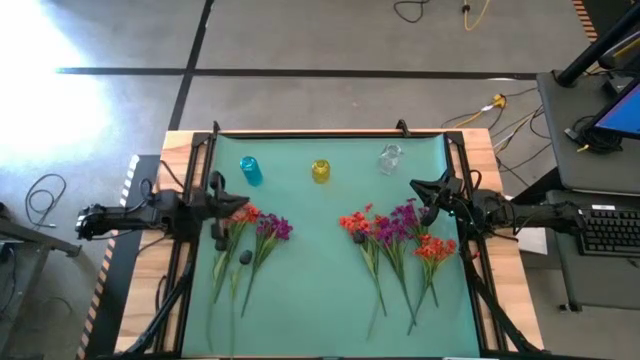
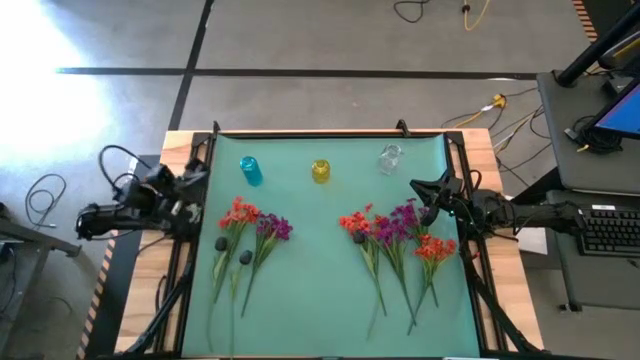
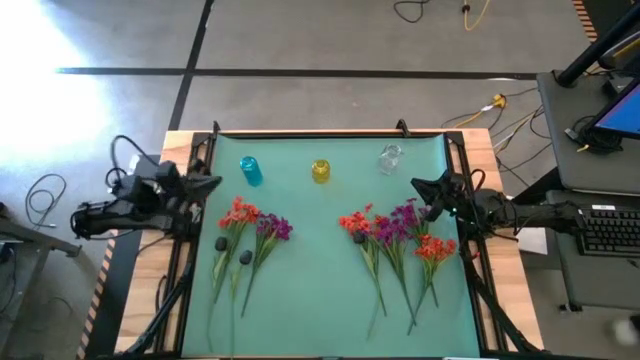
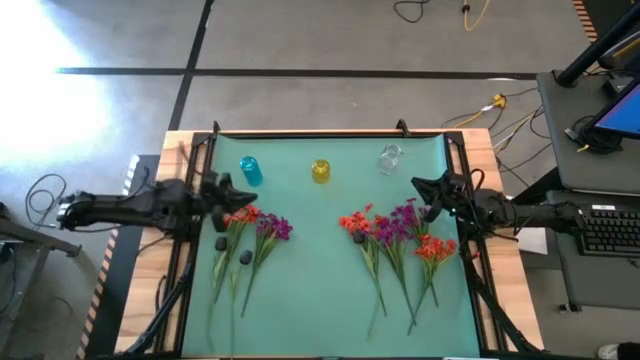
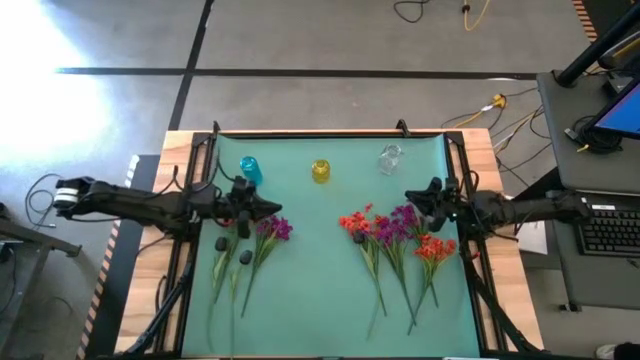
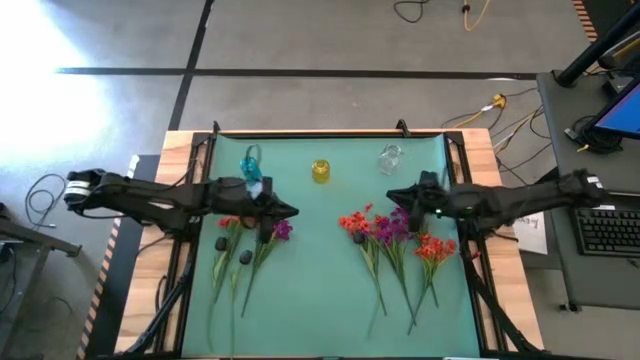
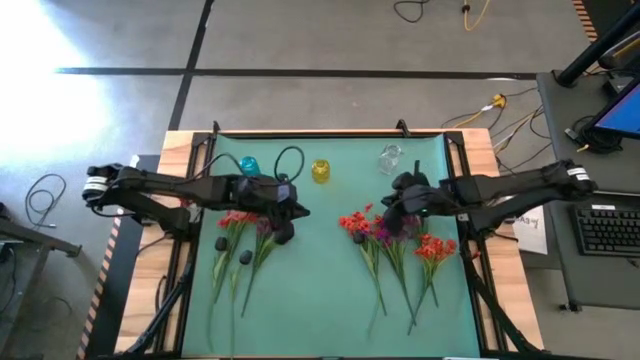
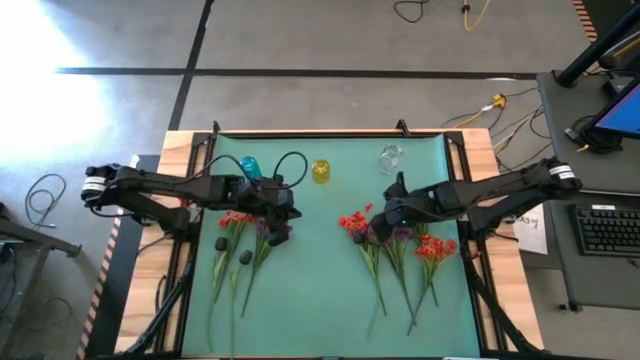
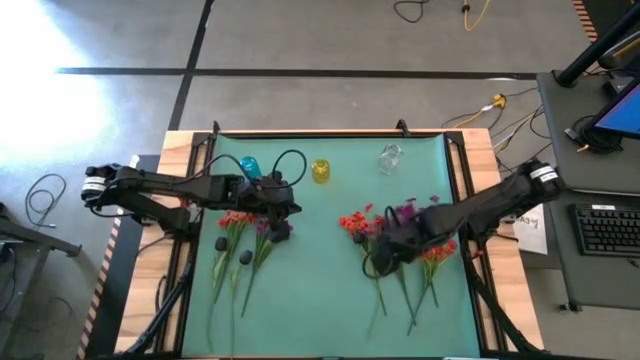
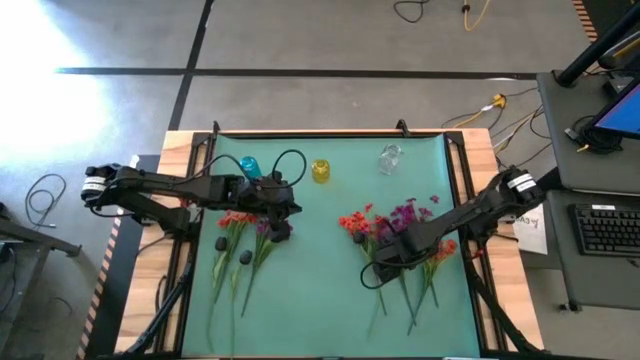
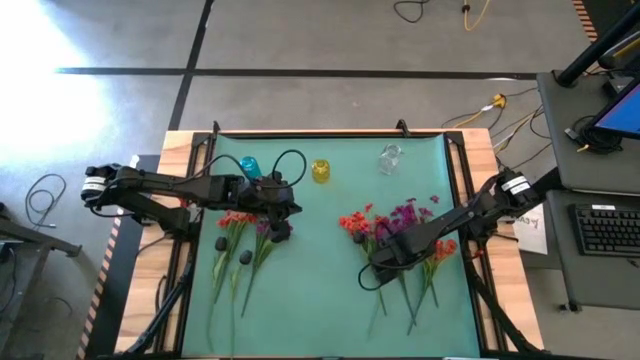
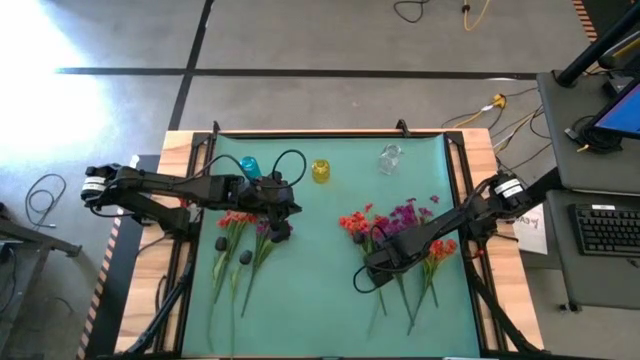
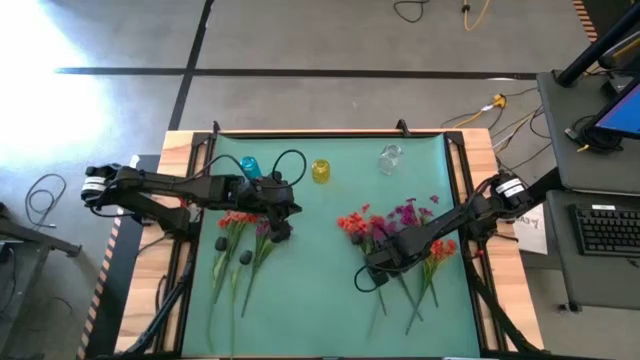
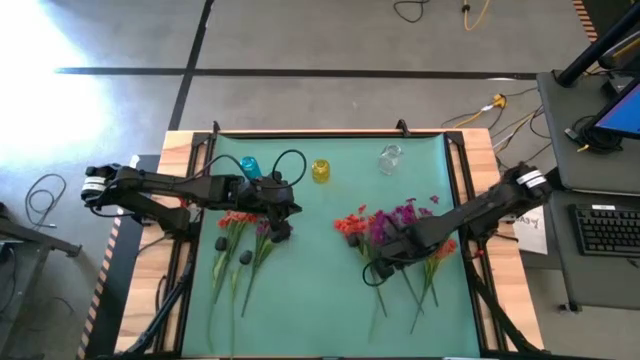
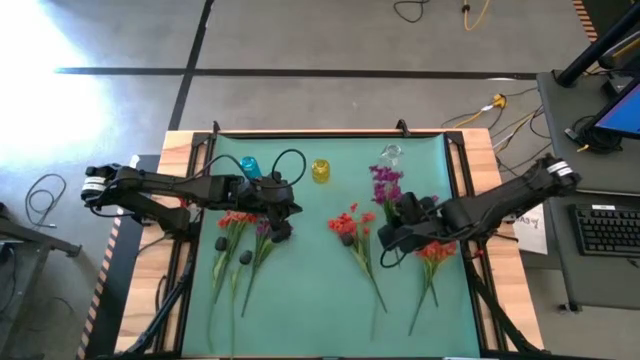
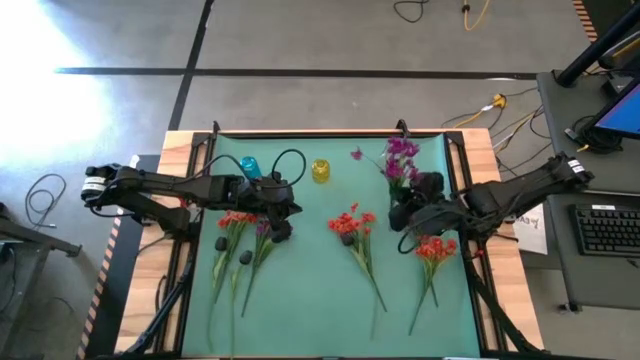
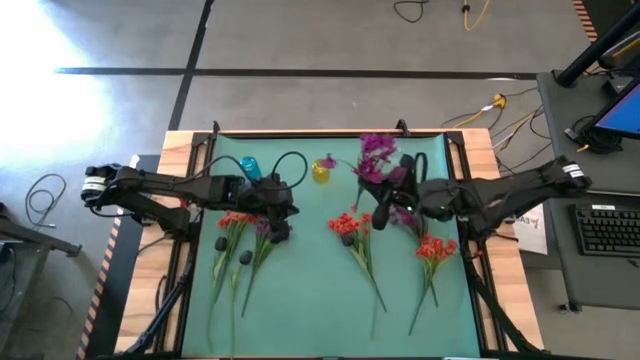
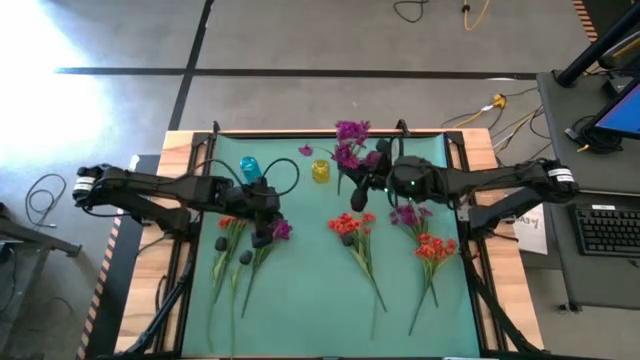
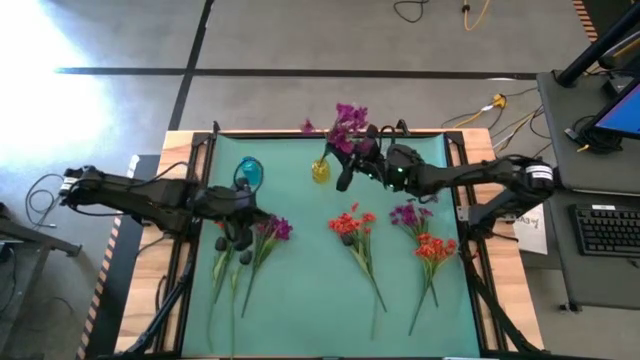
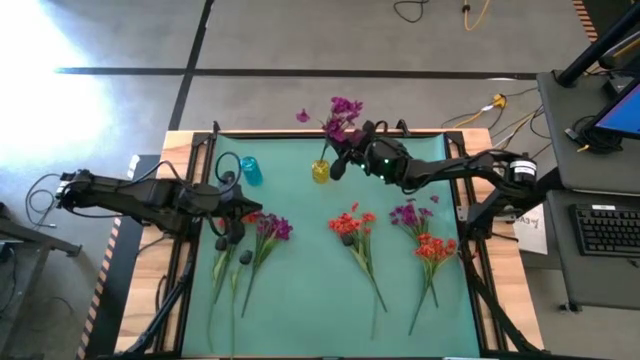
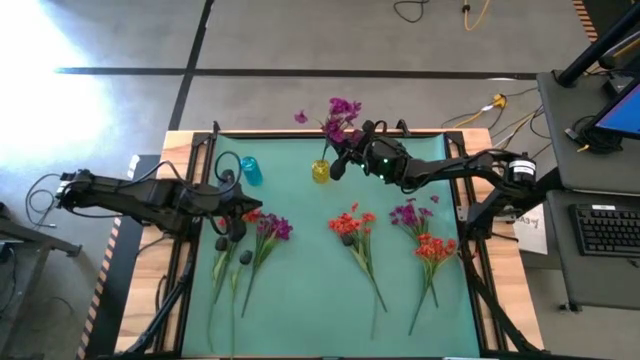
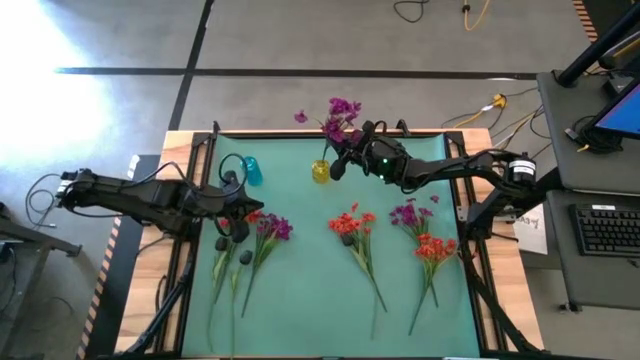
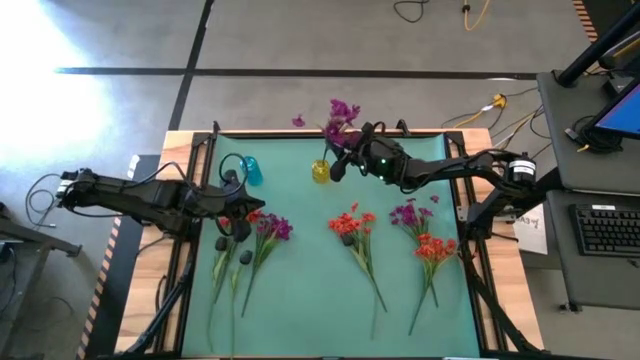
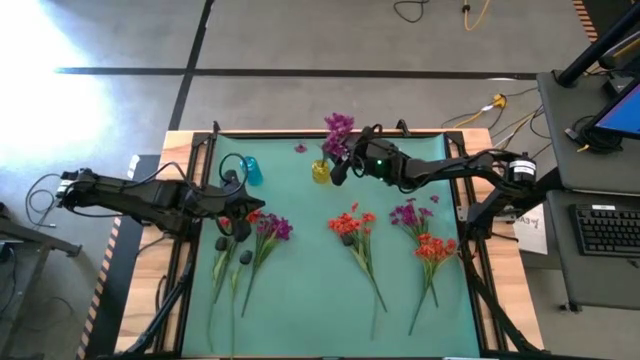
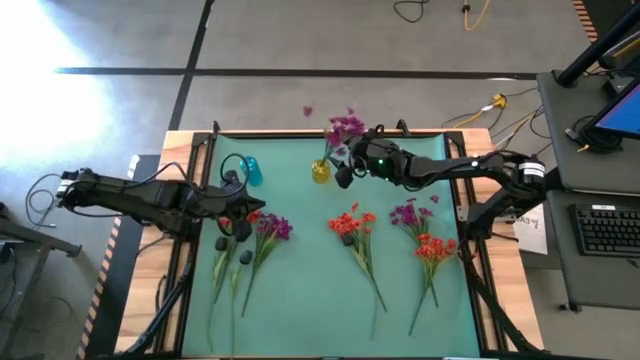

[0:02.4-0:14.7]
Task: Sort flowers into vase by color
Put the middle purple flowers into the yellow vase

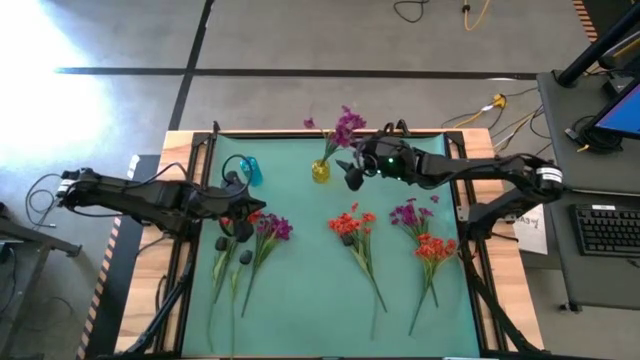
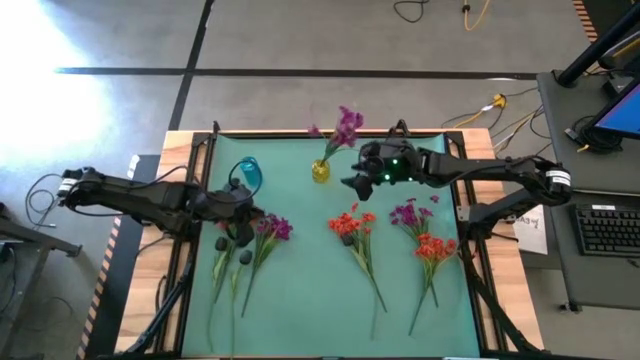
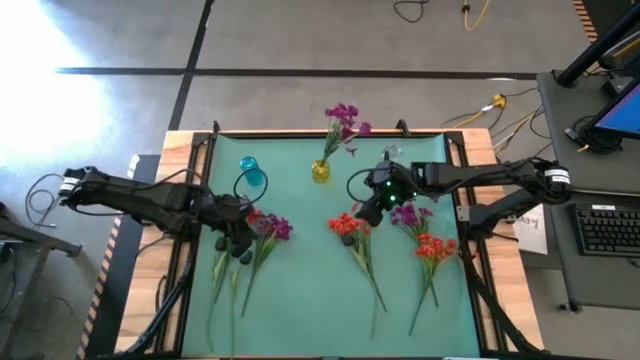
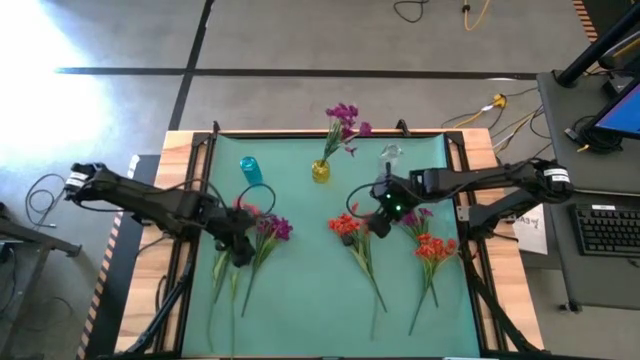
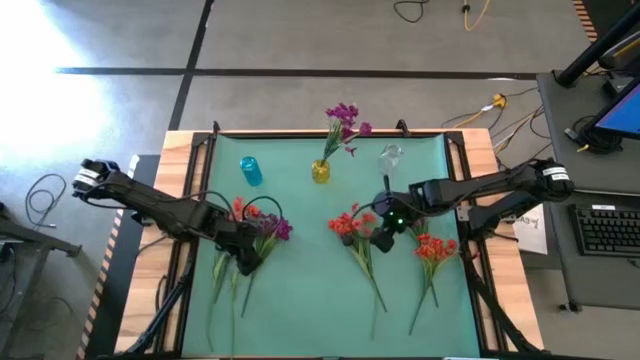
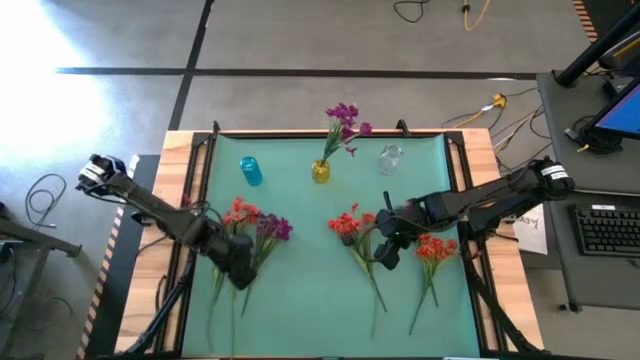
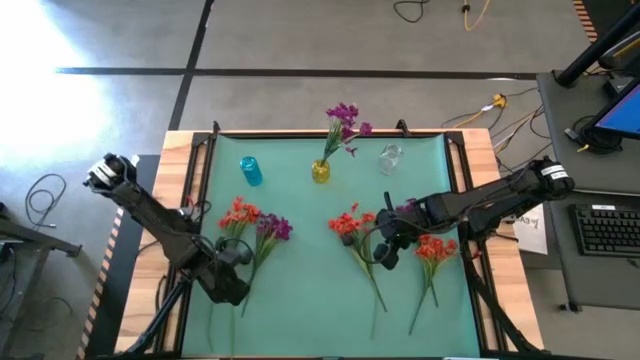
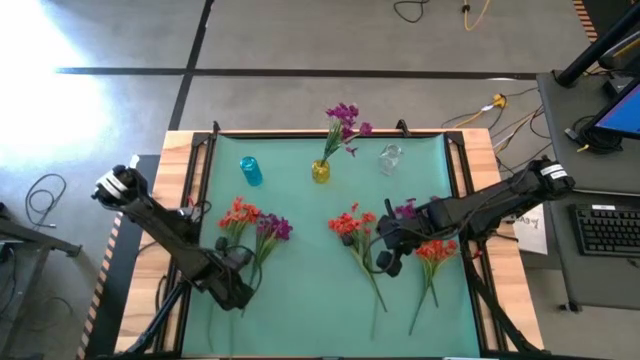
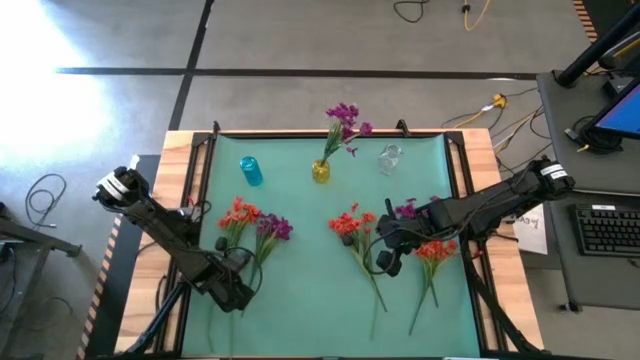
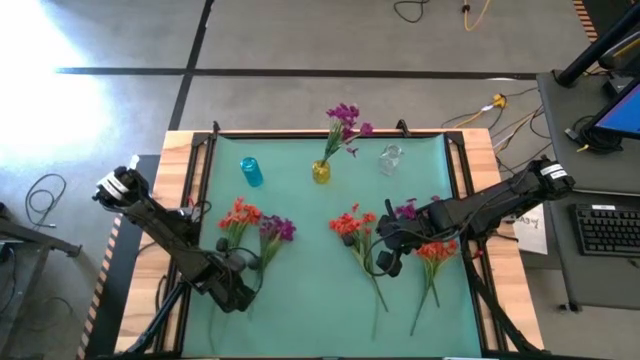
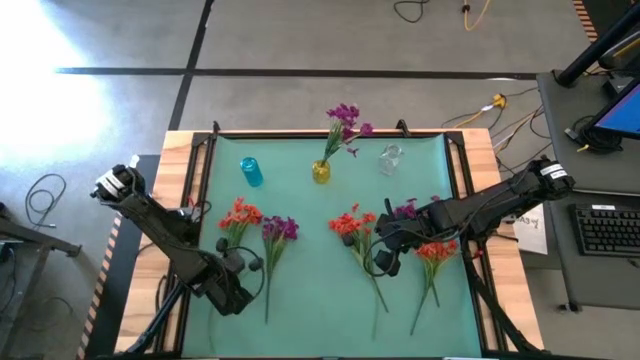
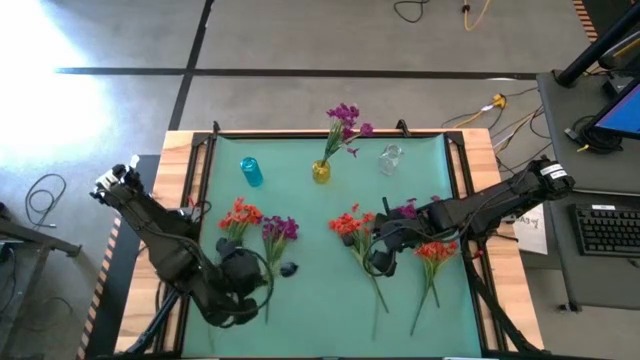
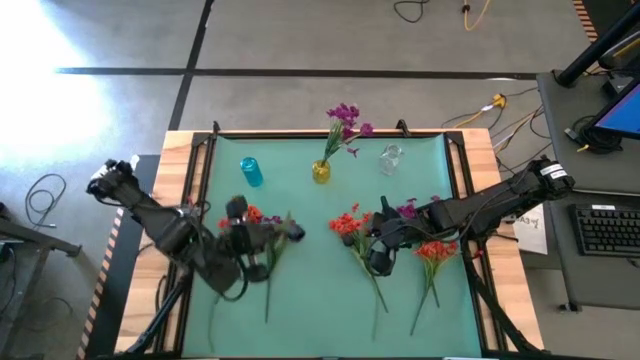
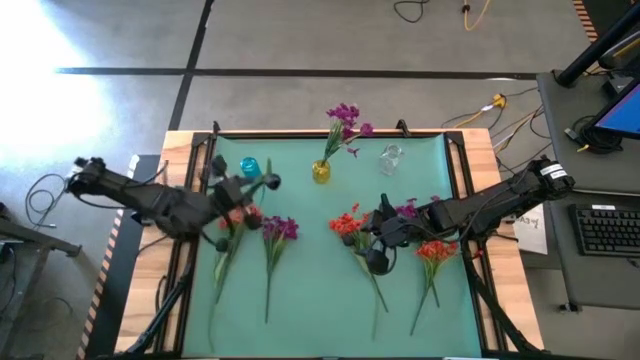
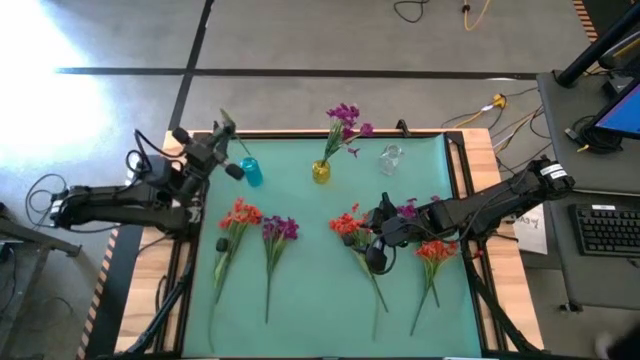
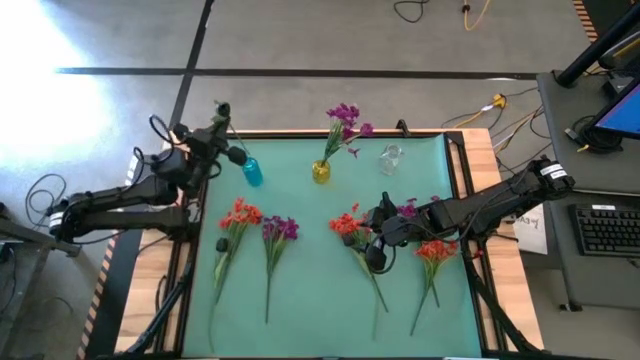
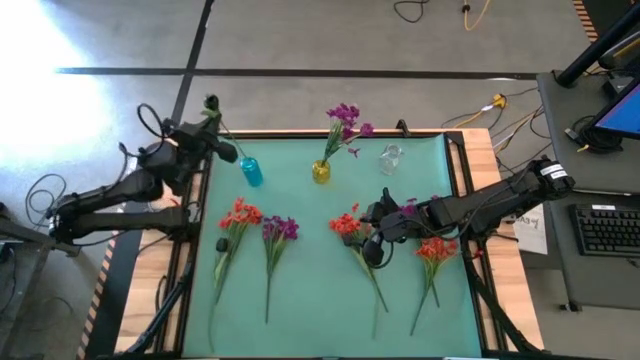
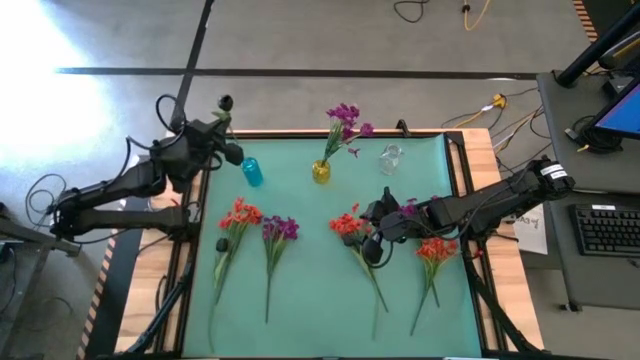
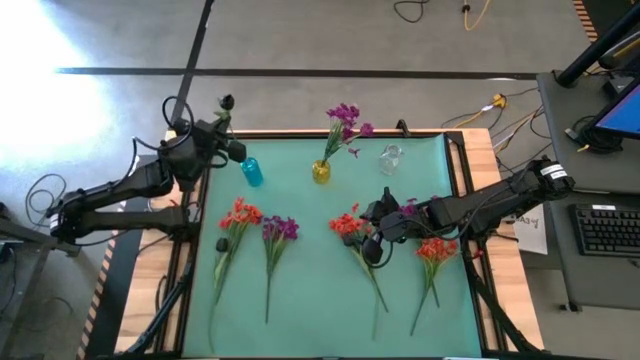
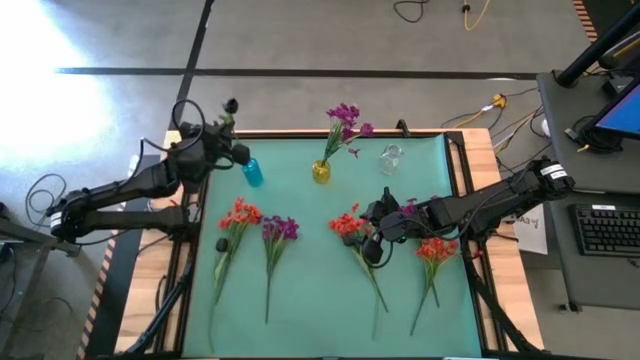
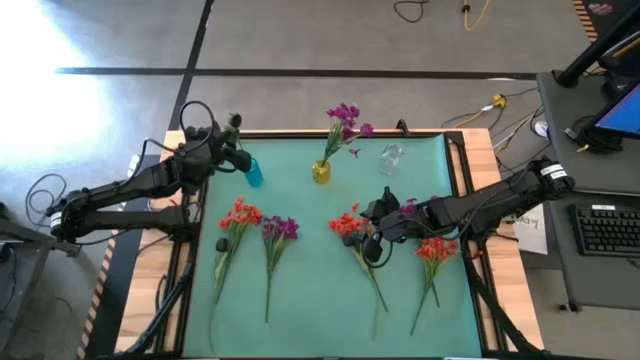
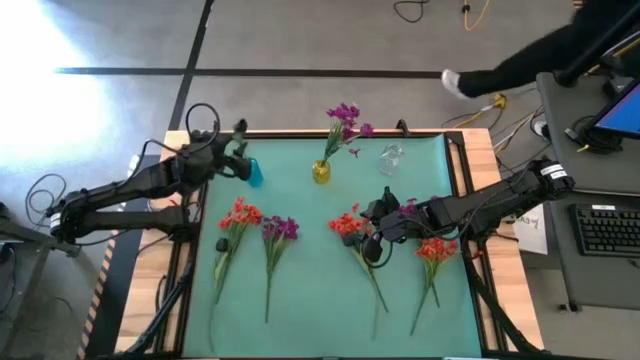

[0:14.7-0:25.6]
Put the middle black flower into the blue vase
